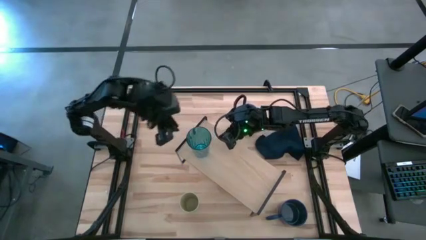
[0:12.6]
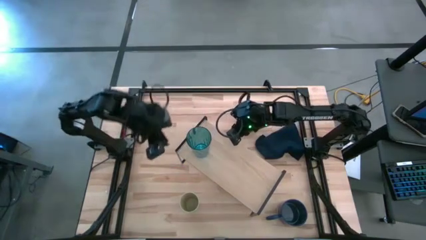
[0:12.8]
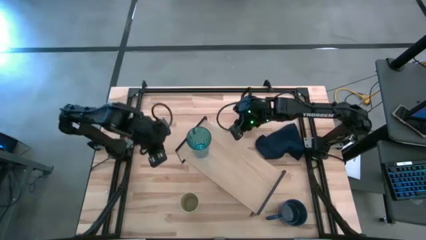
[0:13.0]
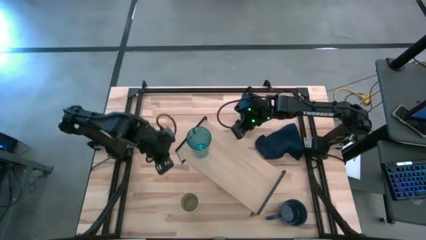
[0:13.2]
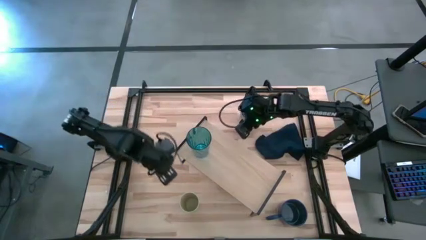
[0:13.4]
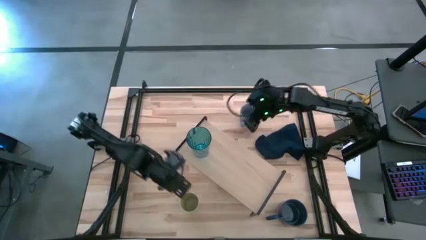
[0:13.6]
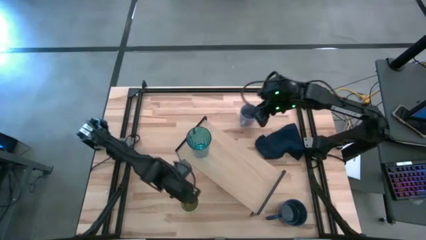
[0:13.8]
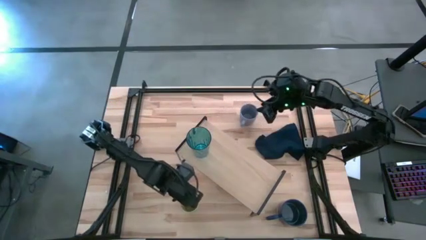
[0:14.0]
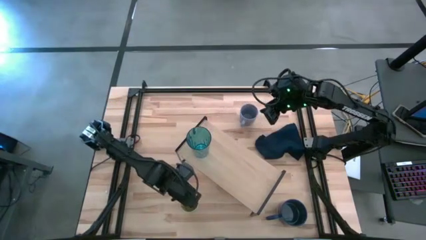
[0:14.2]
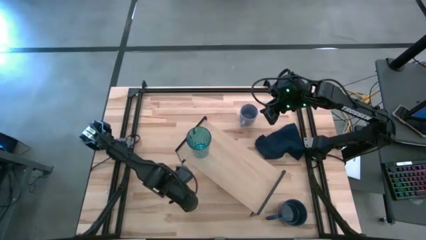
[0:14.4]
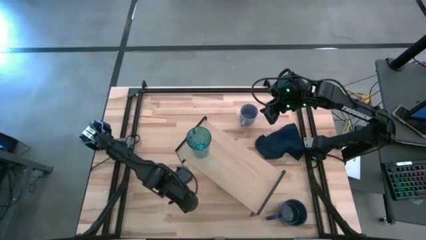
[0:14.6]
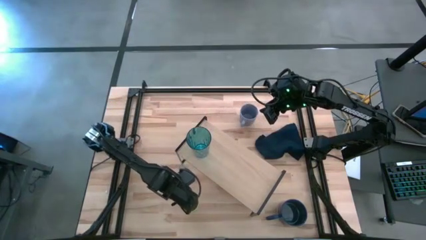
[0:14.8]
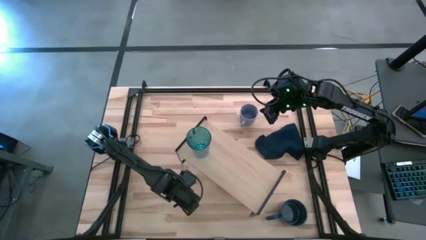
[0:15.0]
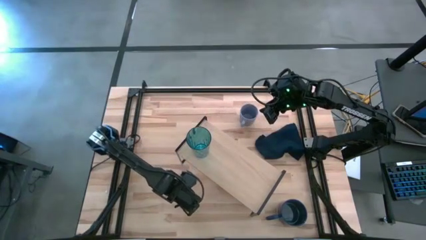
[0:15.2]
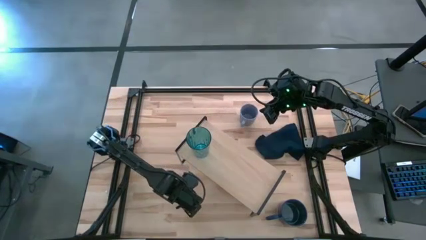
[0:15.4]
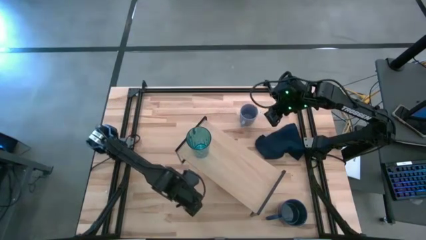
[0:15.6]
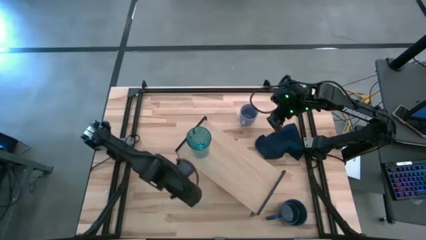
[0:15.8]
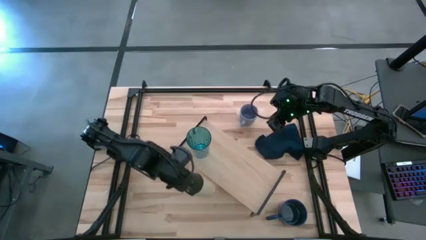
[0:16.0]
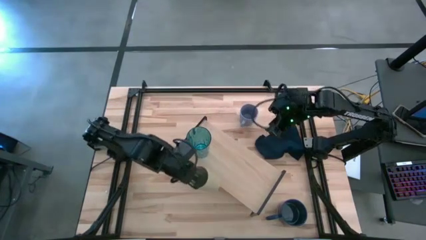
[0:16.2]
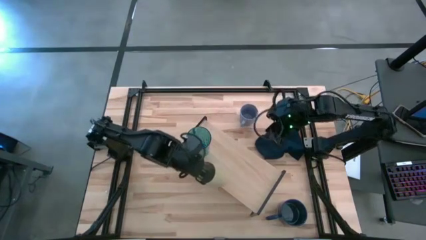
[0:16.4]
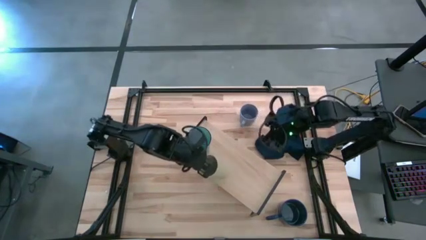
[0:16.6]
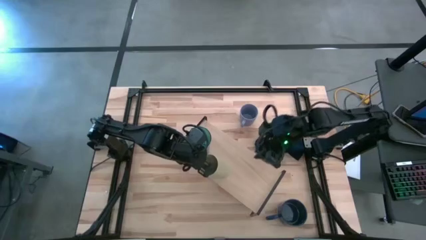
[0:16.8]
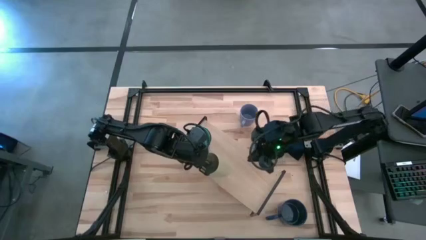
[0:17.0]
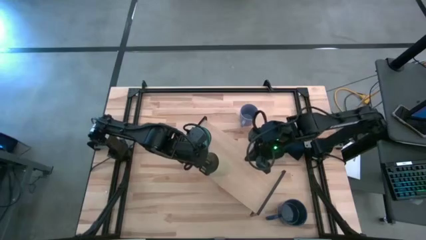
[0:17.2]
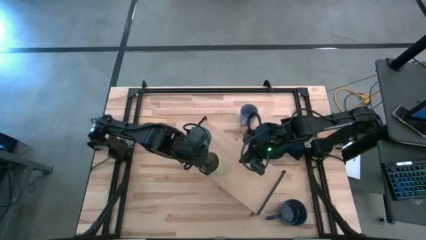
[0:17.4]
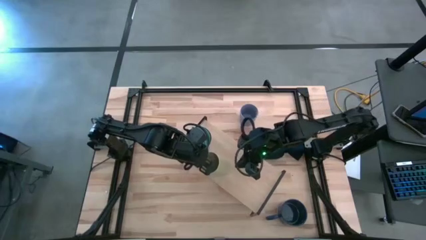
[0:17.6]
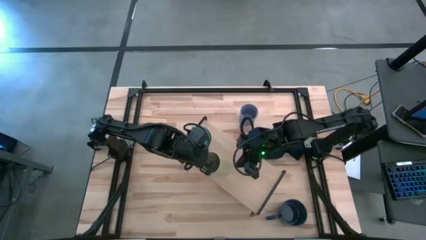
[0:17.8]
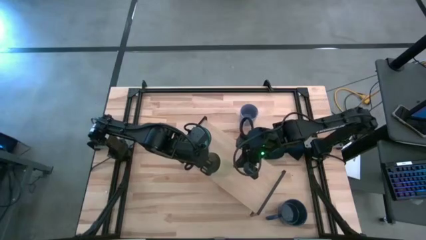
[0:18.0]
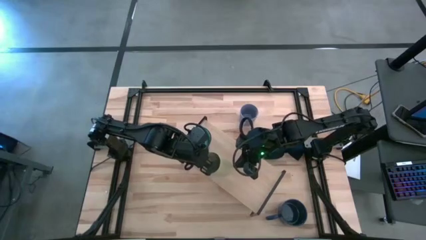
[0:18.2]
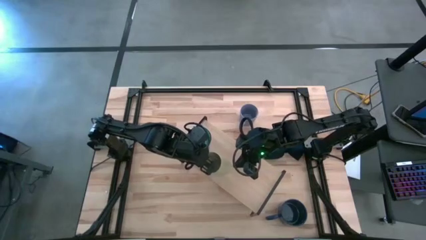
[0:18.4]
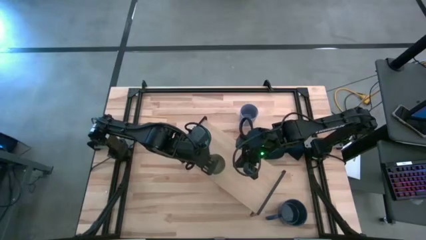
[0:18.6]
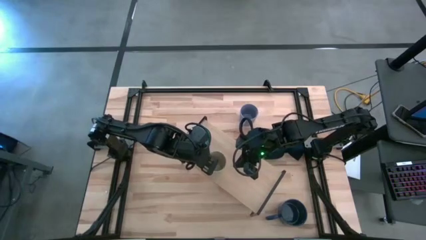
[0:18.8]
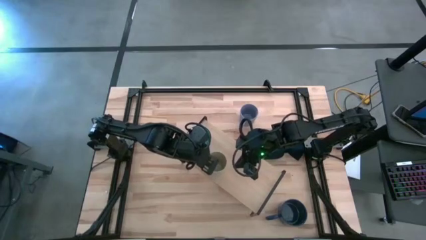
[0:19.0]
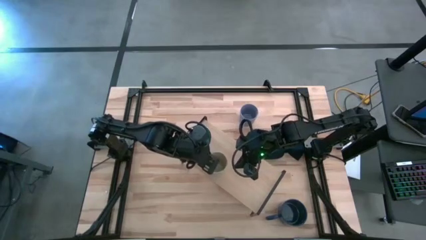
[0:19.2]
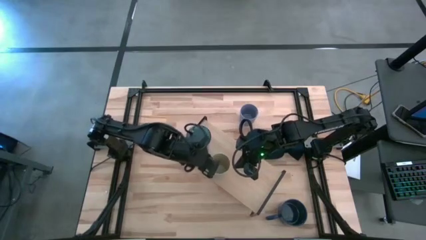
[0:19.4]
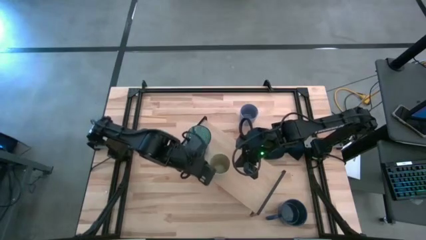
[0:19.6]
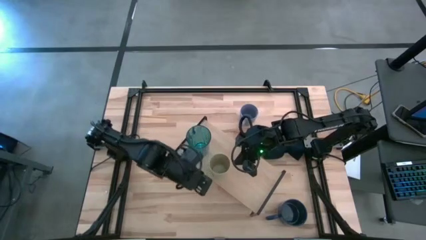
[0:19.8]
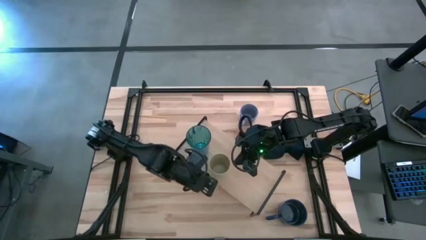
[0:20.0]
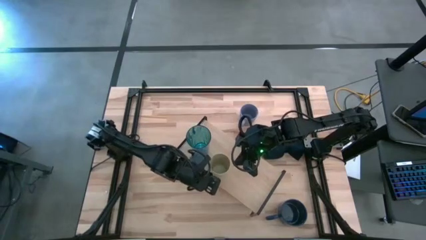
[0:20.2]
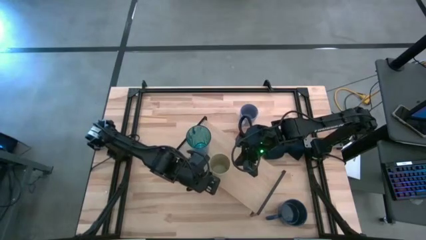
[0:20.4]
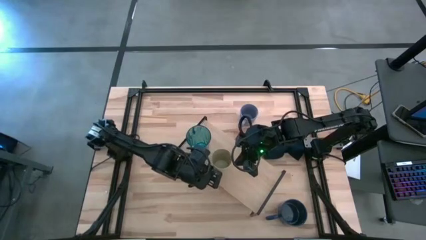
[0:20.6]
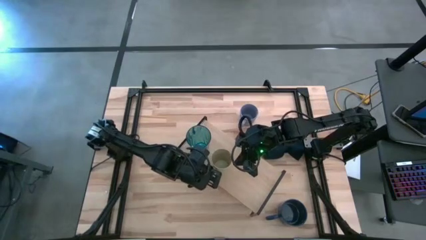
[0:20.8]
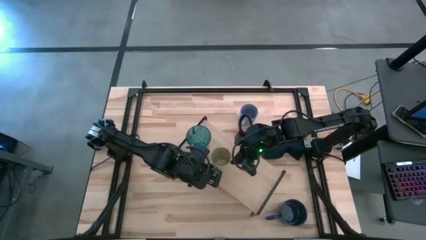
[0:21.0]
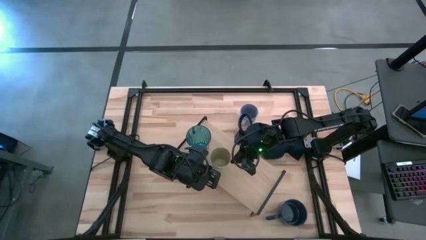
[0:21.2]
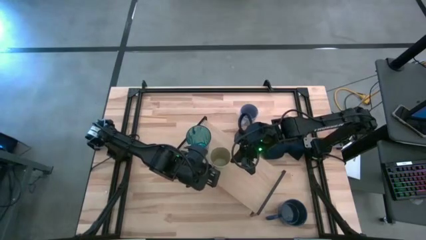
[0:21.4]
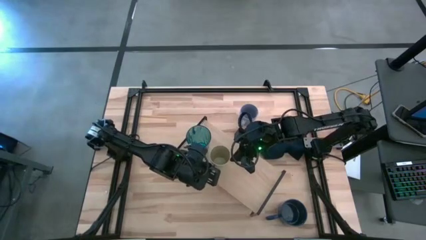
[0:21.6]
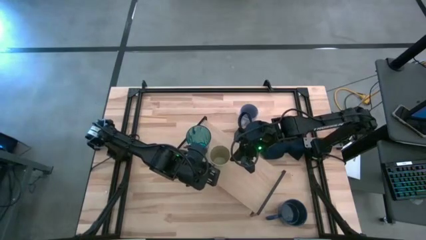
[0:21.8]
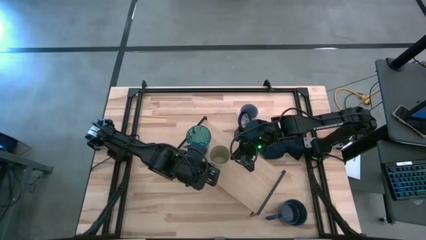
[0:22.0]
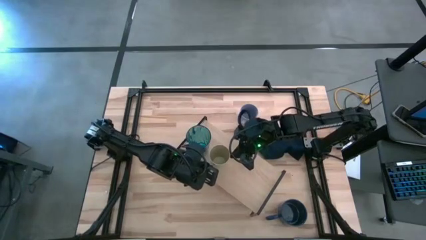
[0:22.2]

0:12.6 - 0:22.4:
Task: Stack small to large cups/mugs on shelf
Put the light brown cup on the shelf

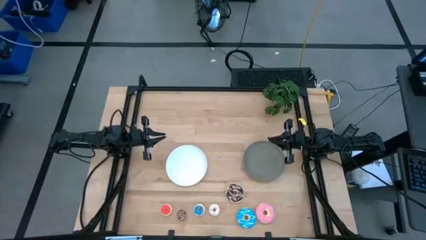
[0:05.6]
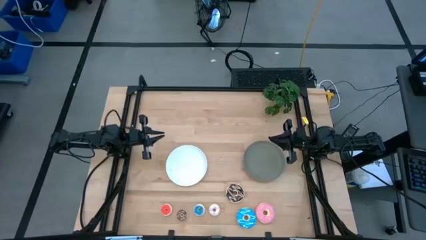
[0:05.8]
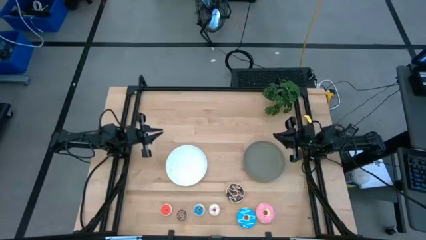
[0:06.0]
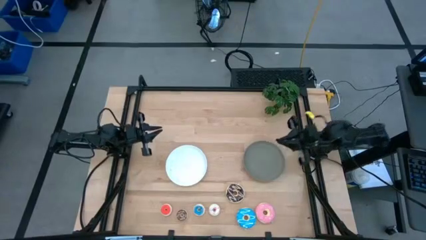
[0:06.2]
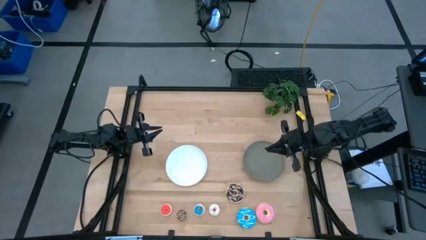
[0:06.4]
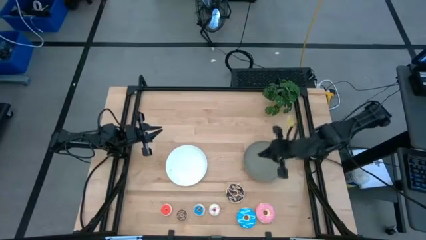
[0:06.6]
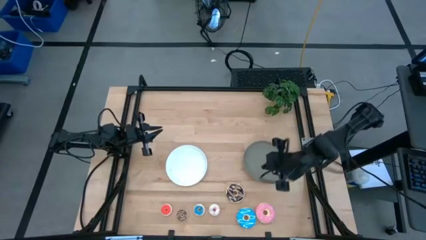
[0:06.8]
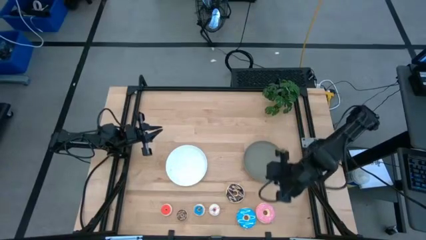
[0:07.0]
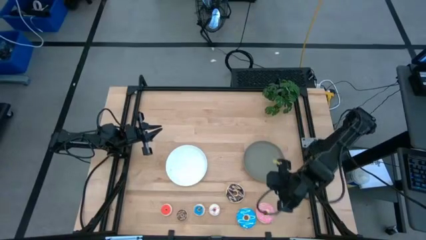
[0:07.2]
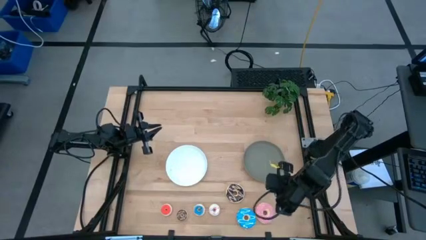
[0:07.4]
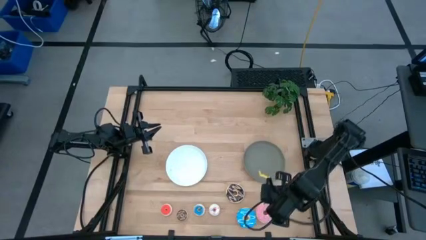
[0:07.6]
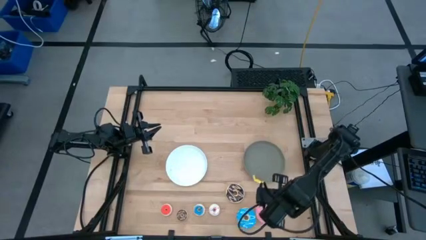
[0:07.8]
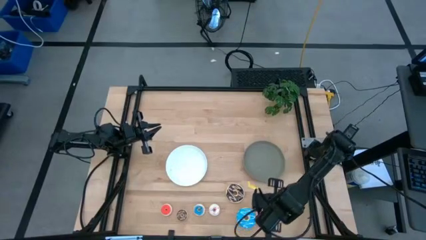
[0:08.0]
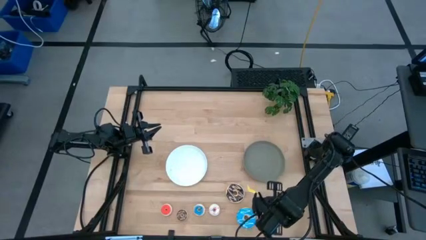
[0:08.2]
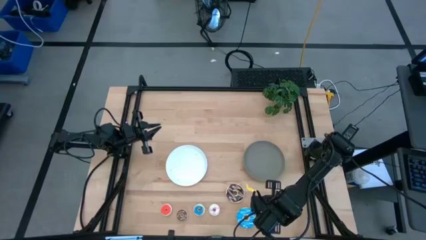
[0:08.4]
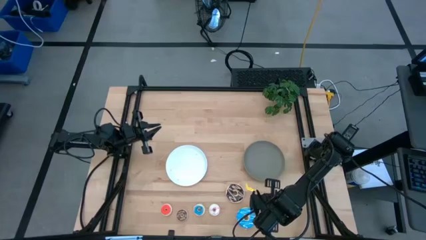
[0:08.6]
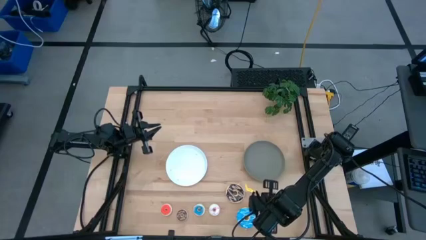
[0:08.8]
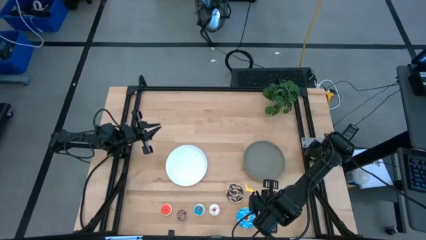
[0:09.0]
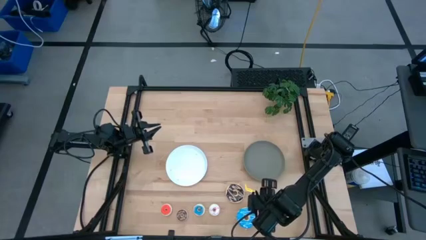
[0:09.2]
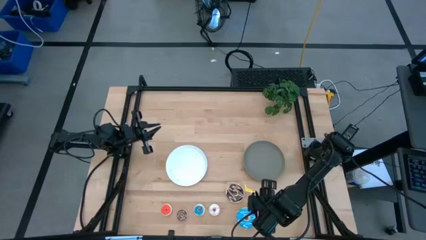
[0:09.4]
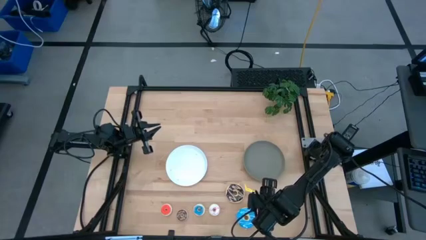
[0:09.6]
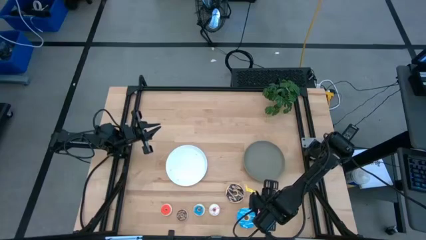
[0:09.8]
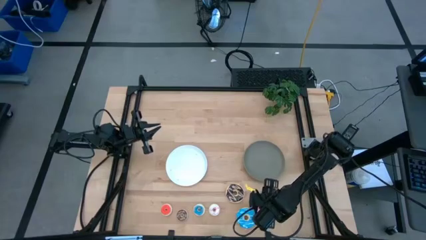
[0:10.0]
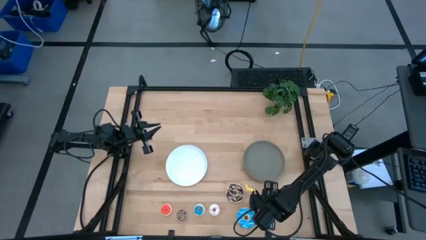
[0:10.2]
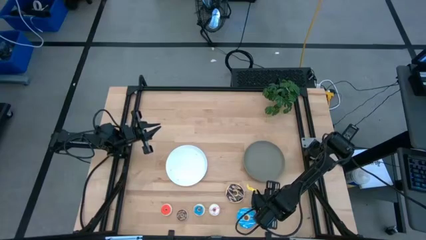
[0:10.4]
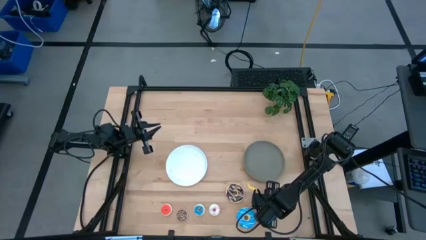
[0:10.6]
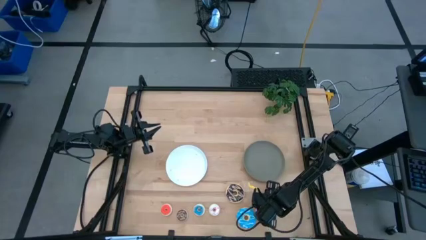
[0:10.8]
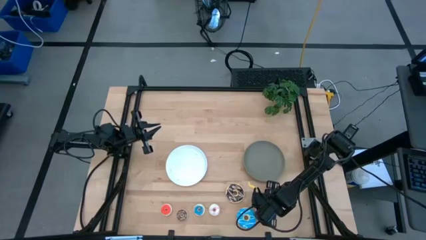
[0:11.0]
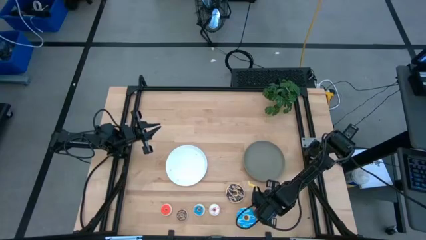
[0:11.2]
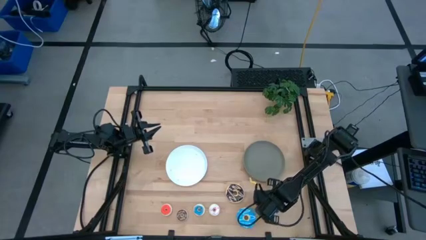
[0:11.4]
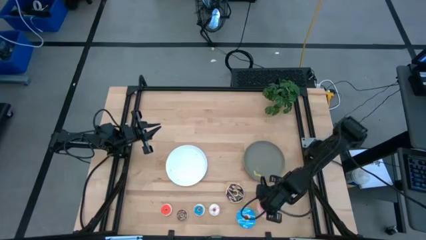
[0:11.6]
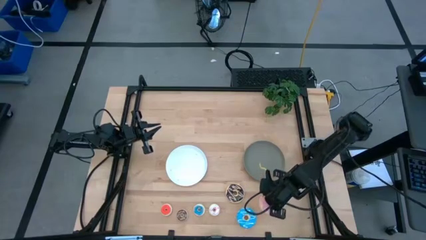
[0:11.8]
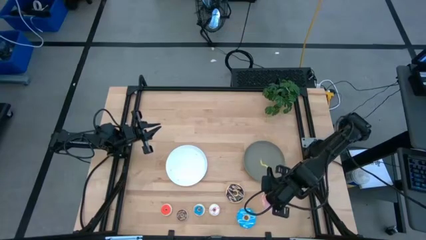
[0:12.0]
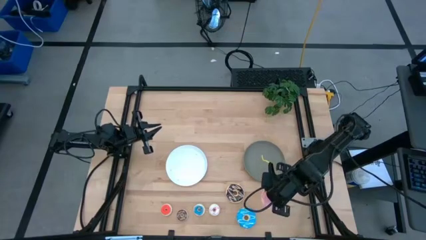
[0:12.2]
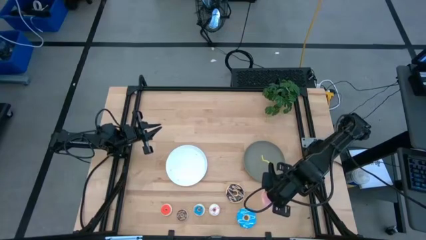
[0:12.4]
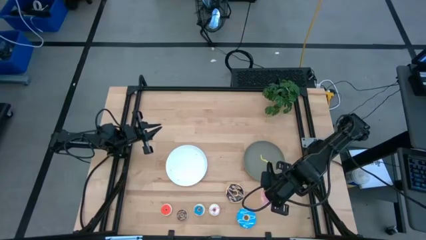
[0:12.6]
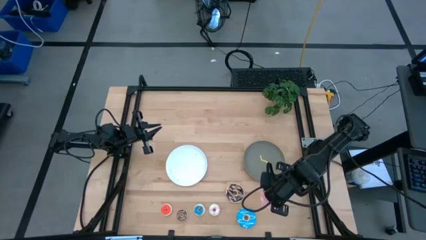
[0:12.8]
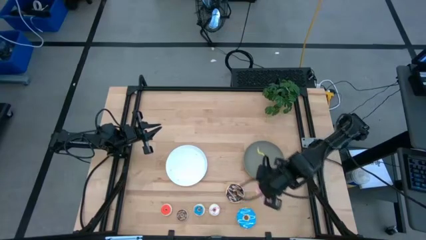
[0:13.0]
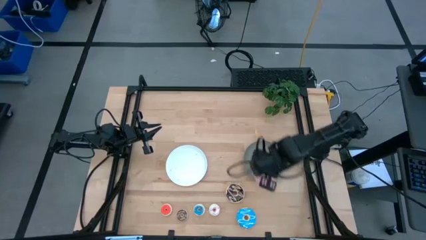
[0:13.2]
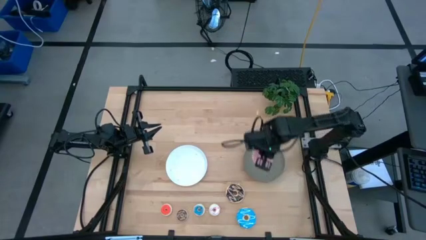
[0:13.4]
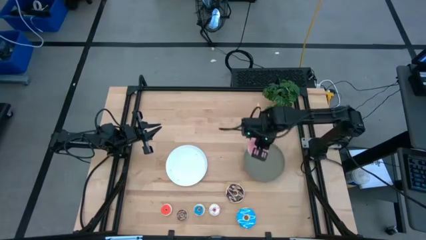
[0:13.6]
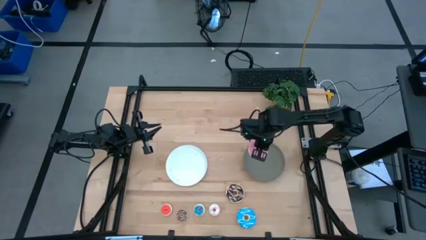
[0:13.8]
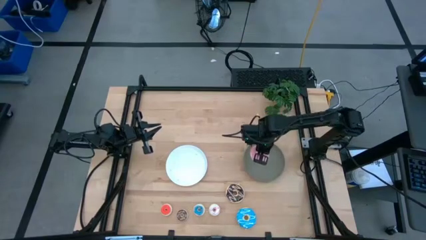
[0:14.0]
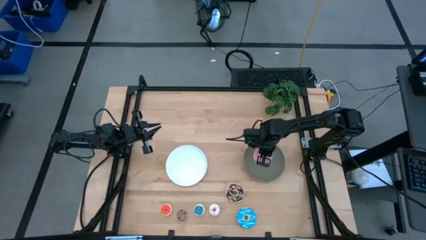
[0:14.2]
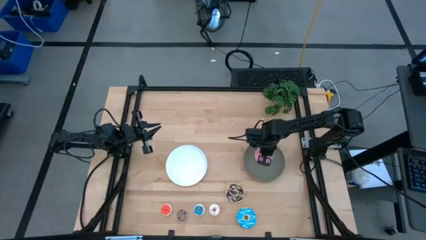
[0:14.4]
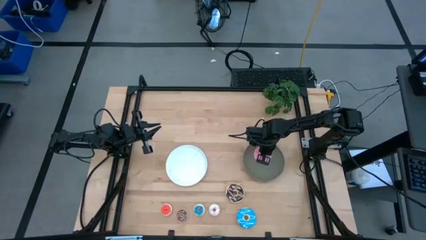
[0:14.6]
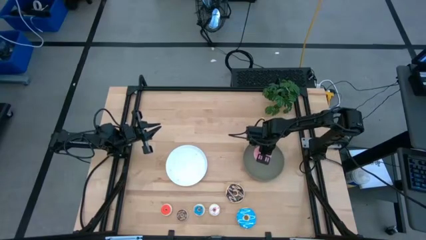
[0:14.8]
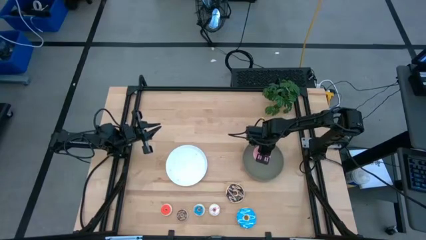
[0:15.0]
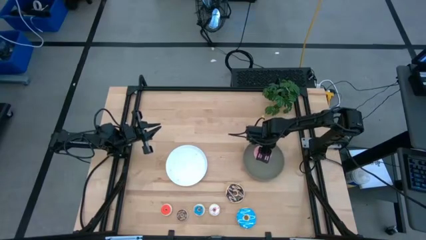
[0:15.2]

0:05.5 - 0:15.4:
Task: Pick & Place donuts
Put the big pink donut on the gray plate
